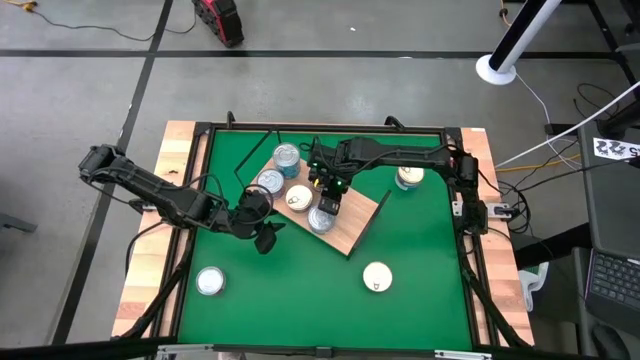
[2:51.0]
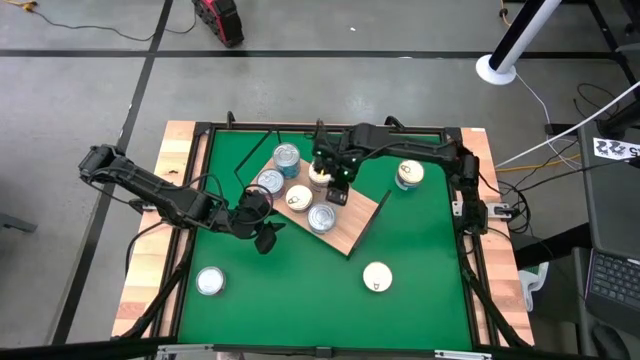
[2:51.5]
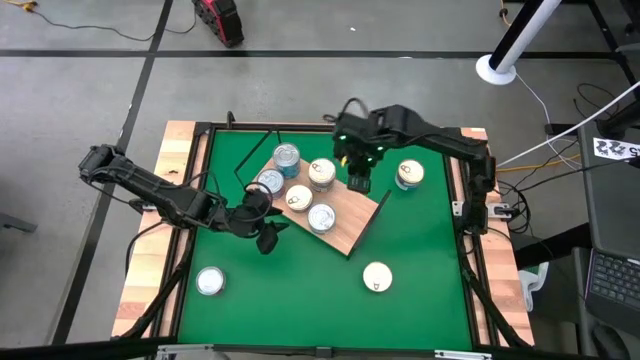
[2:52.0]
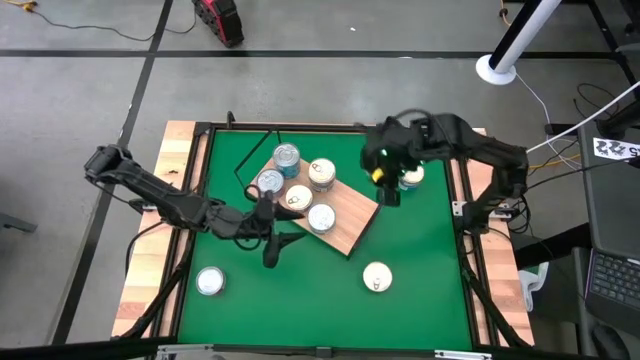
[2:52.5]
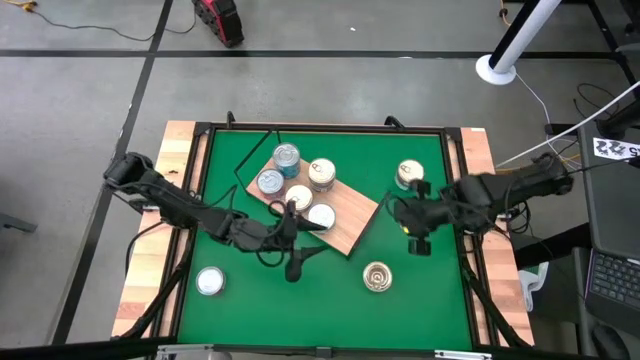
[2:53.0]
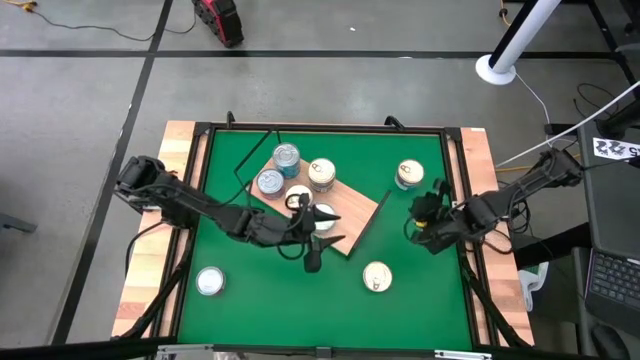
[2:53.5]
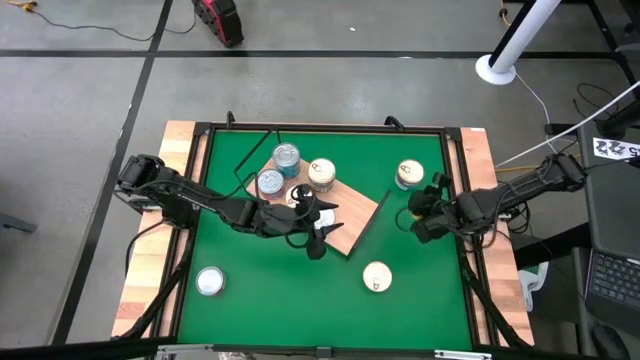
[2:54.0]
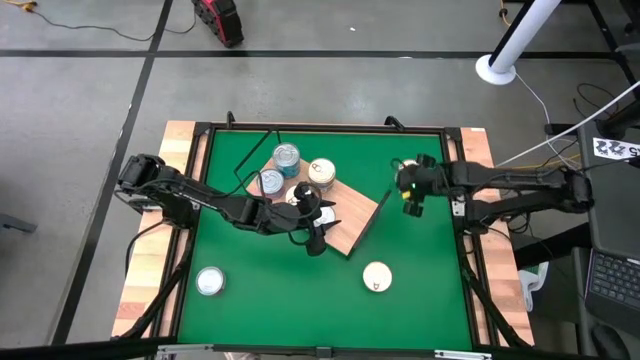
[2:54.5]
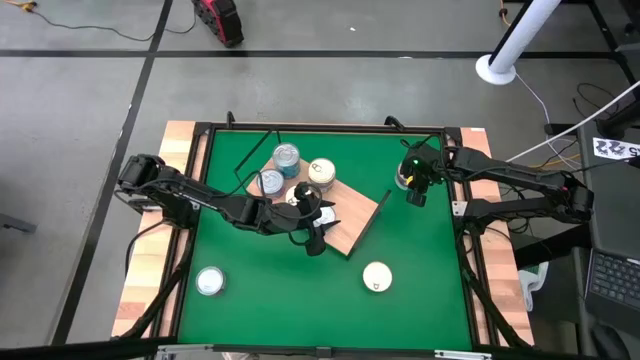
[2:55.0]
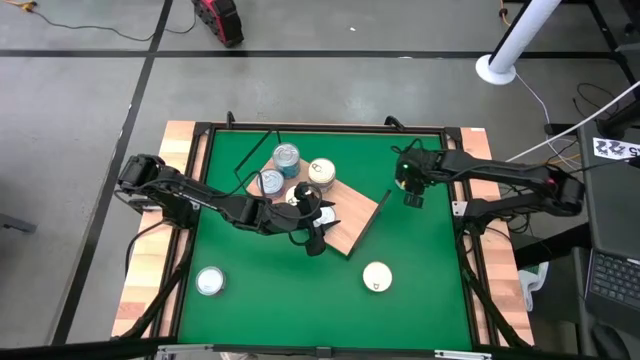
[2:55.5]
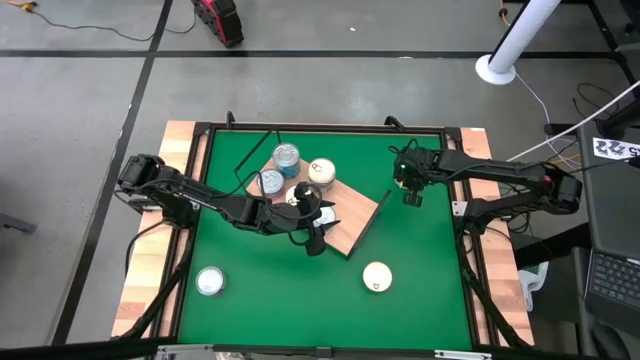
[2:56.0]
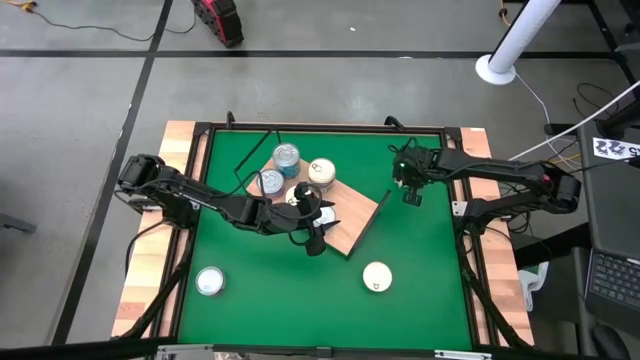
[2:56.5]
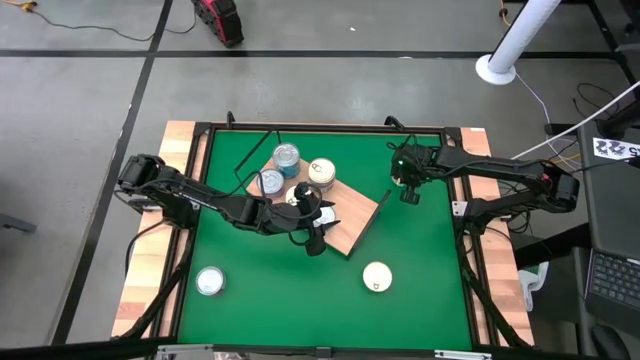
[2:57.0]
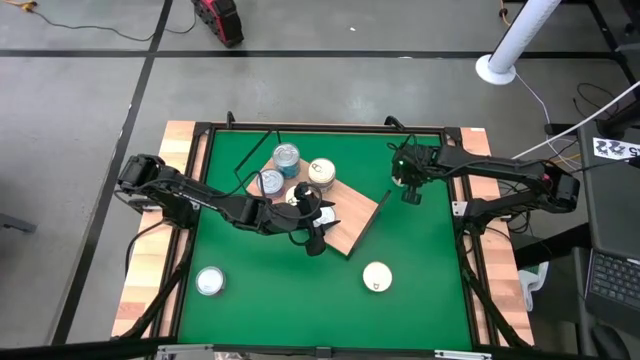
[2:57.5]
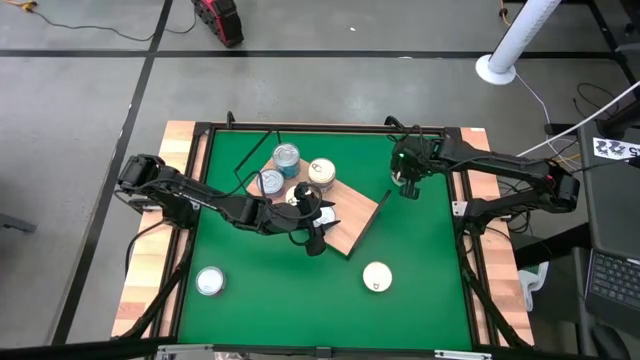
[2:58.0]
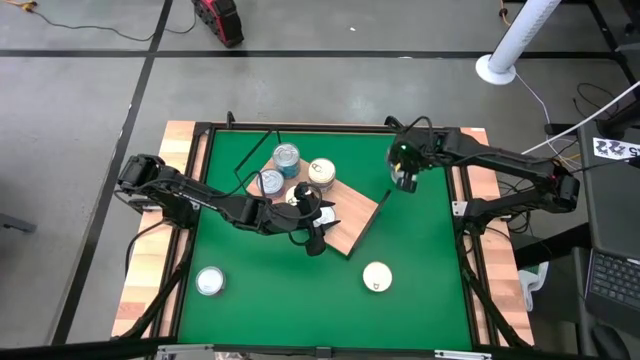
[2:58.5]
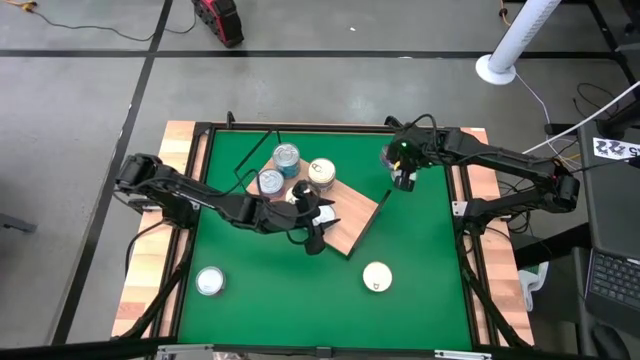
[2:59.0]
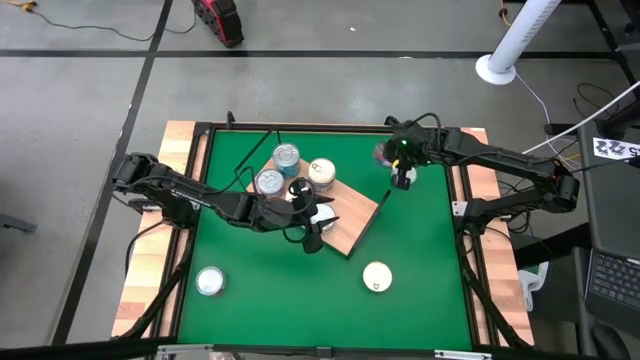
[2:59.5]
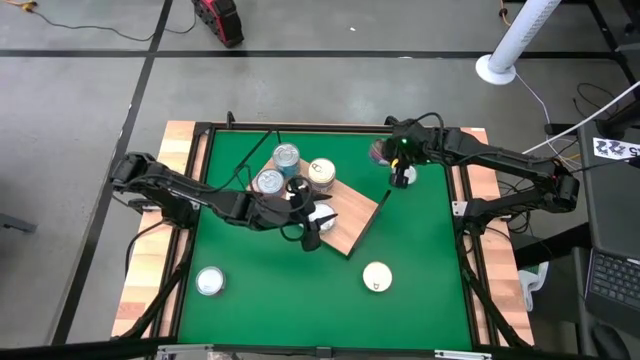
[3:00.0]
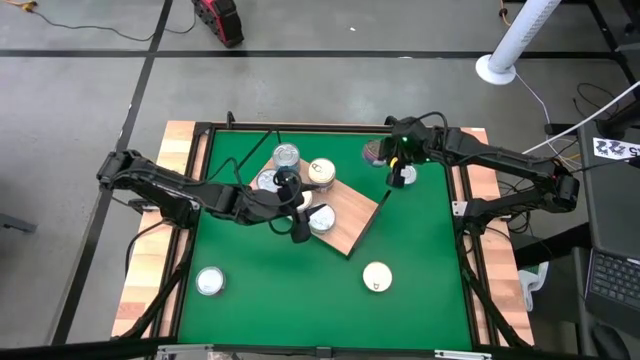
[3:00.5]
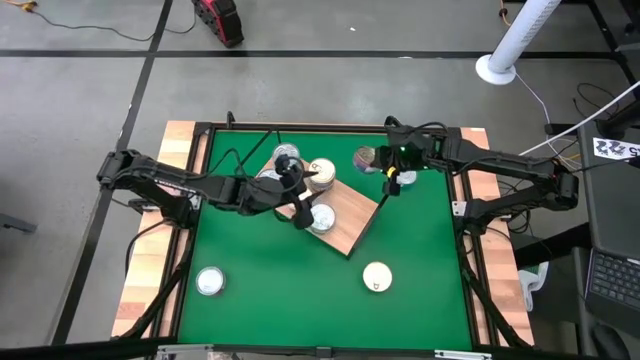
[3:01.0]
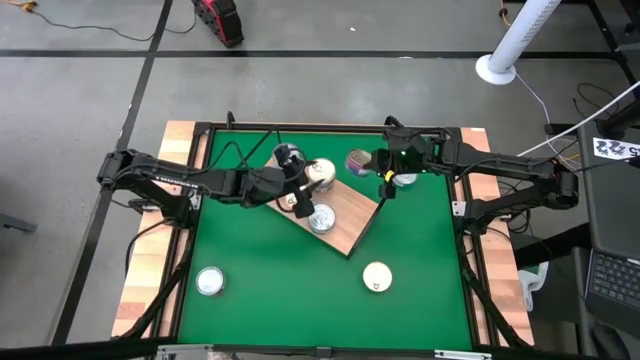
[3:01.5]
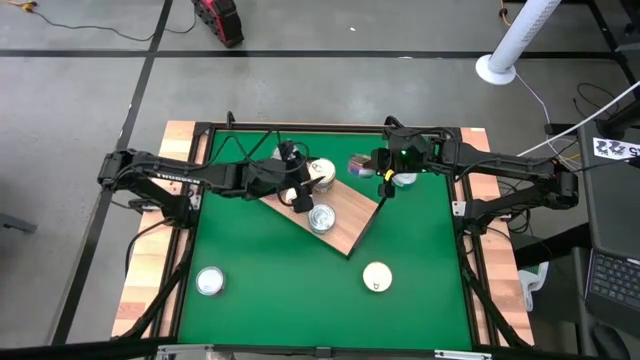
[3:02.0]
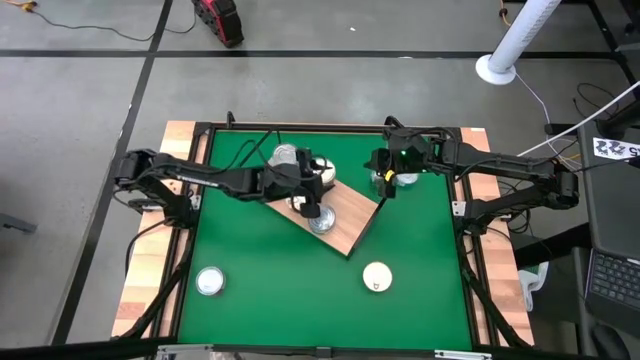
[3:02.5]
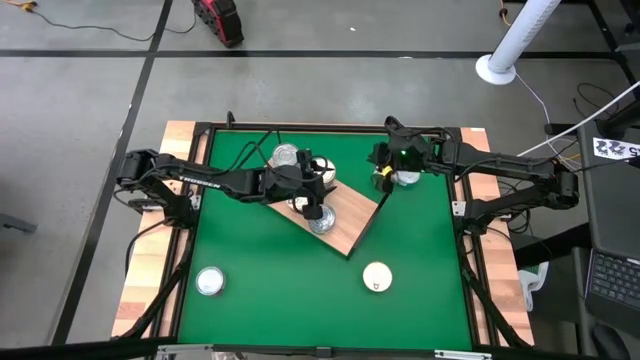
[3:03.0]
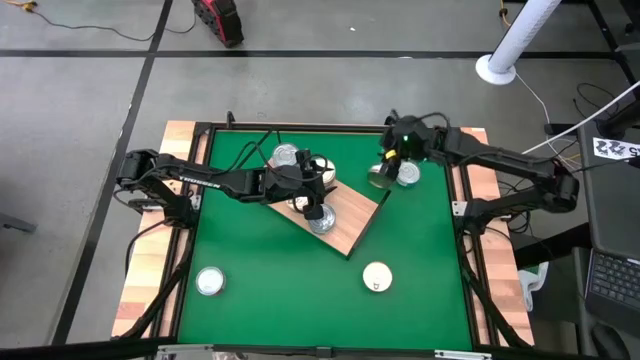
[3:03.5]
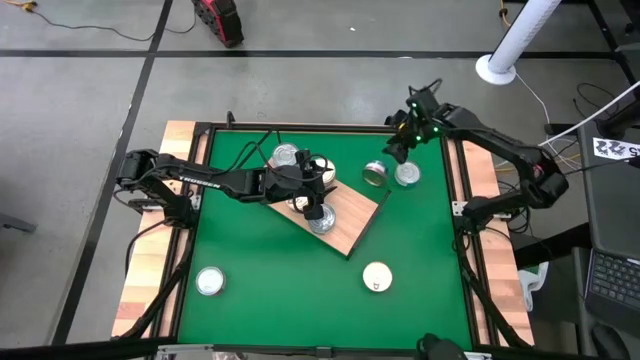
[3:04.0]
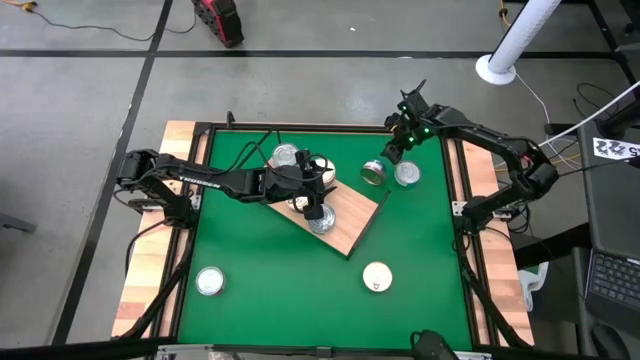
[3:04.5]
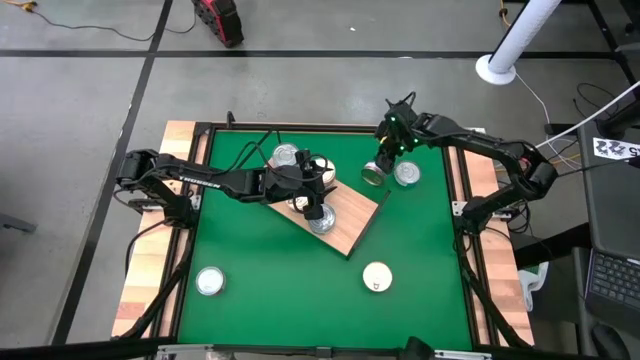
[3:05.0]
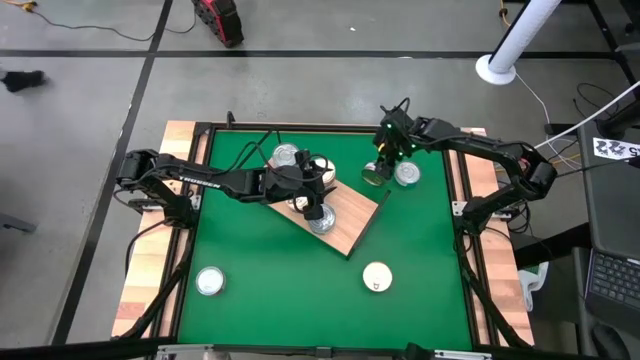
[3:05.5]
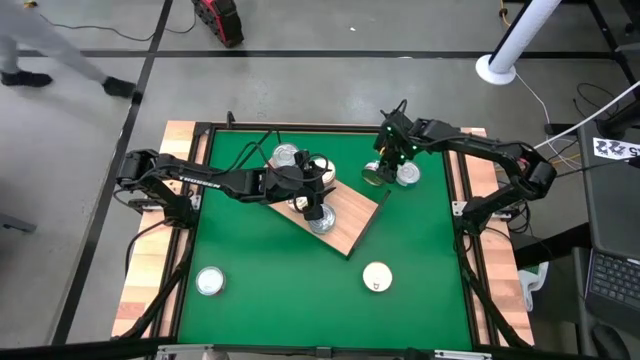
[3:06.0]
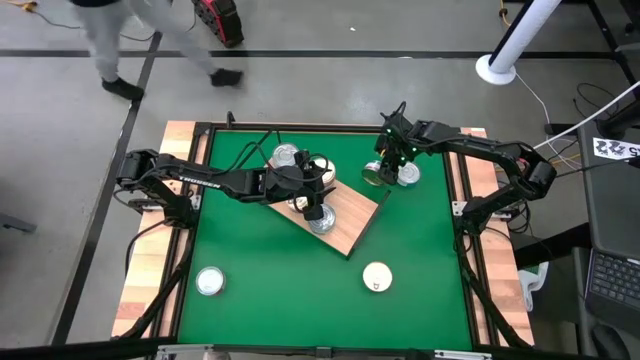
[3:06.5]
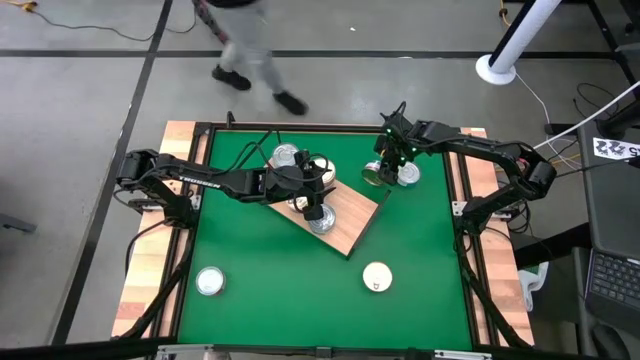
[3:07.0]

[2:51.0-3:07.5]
Task: Stack canned seafood by type on shelf
Stack the blue and pink tuna can on top of the blue and pink tuna can on the shelf

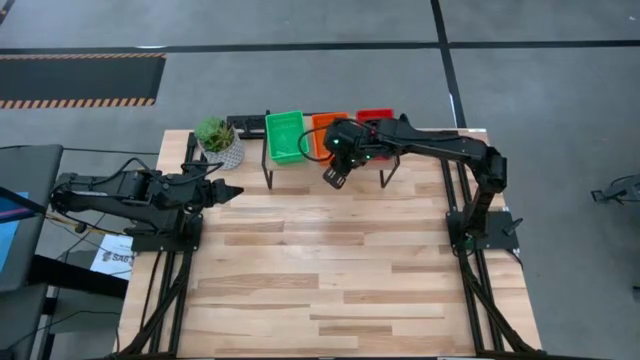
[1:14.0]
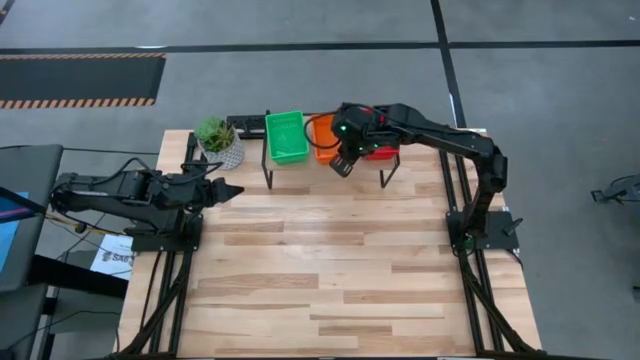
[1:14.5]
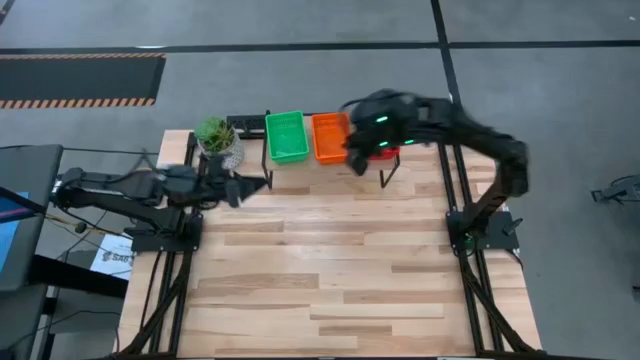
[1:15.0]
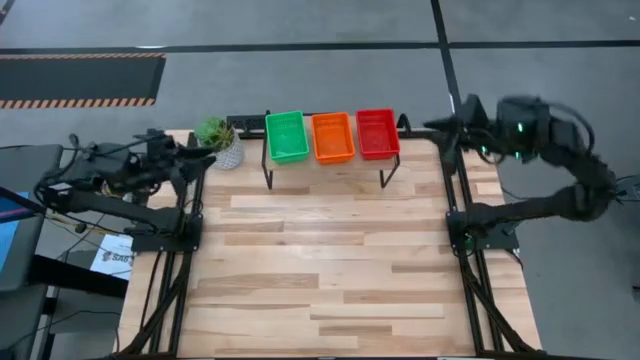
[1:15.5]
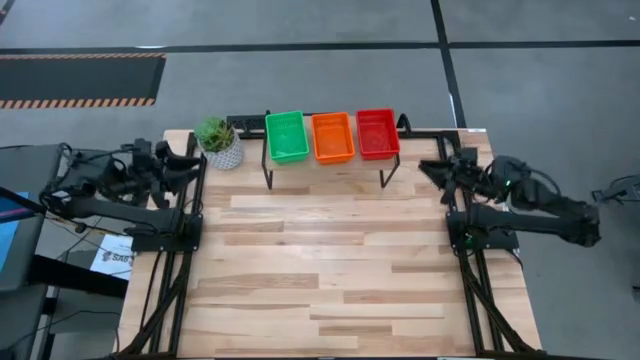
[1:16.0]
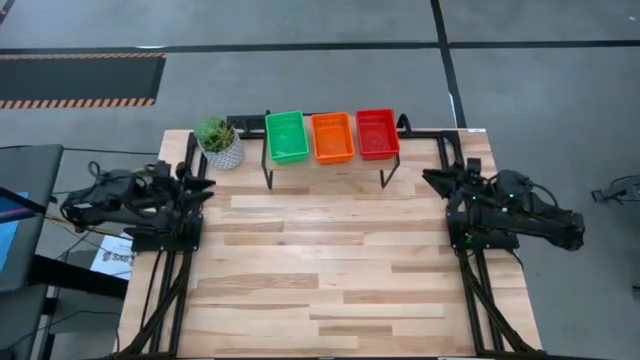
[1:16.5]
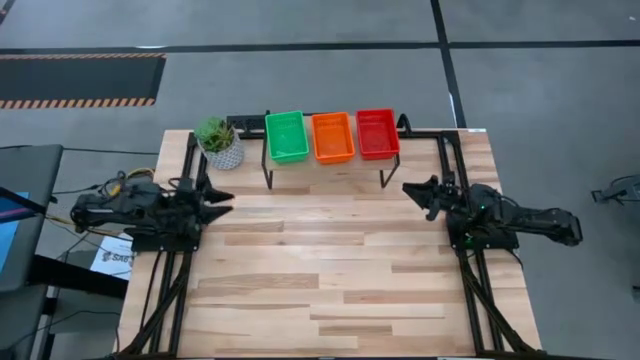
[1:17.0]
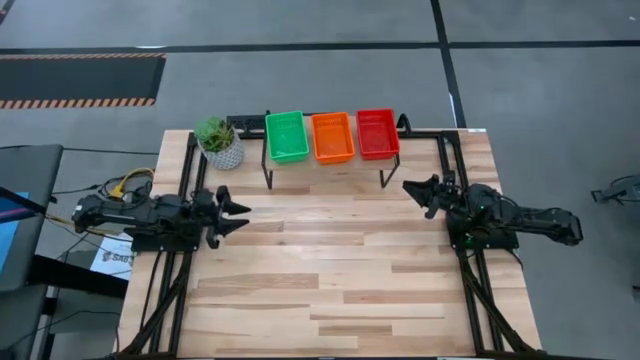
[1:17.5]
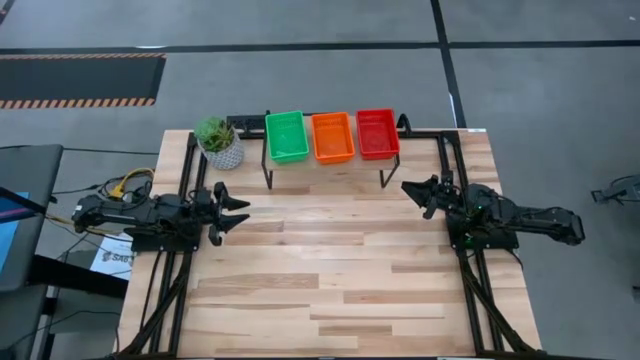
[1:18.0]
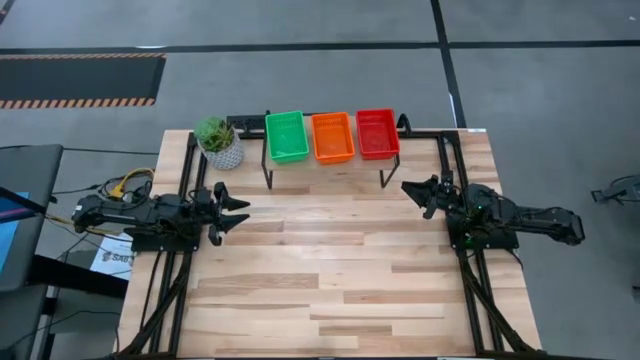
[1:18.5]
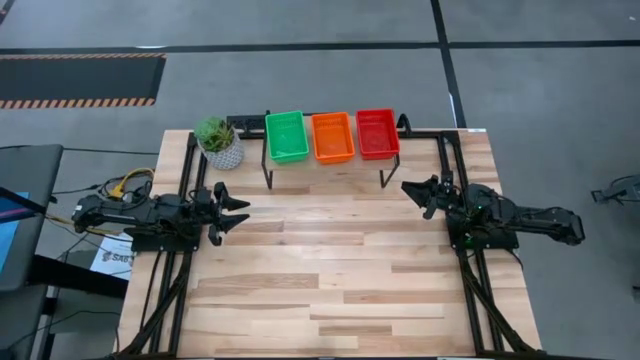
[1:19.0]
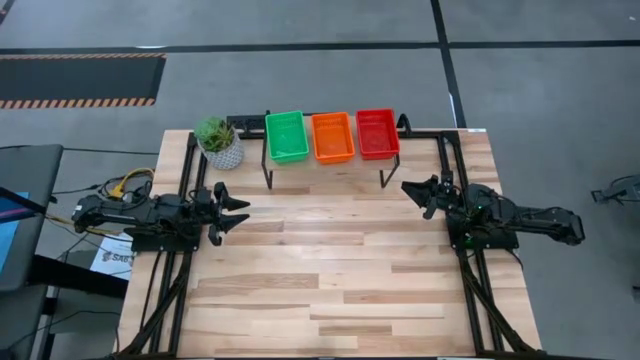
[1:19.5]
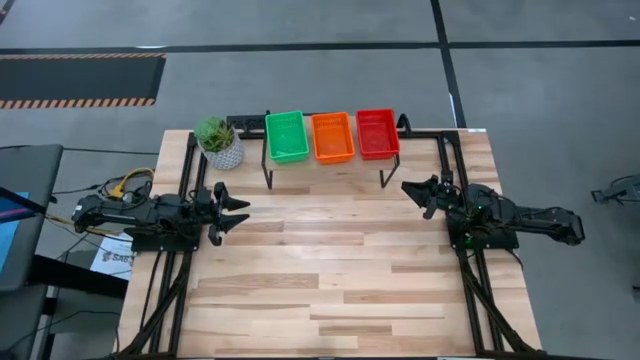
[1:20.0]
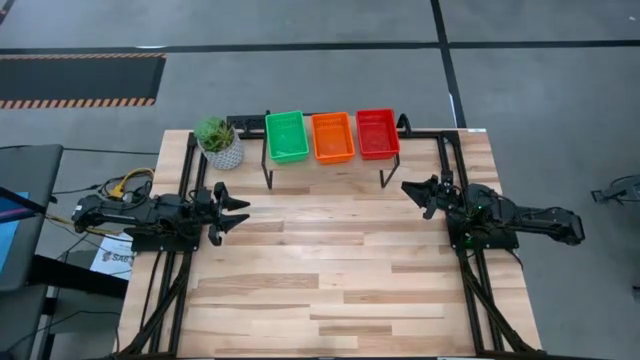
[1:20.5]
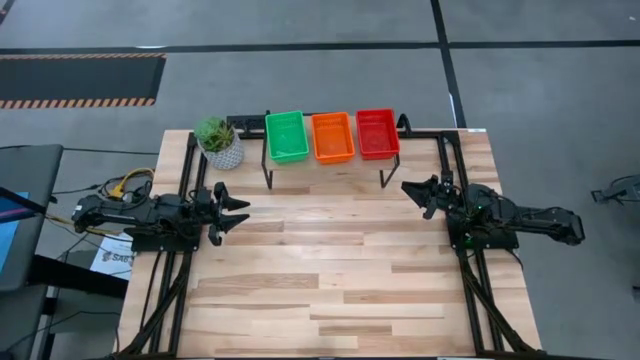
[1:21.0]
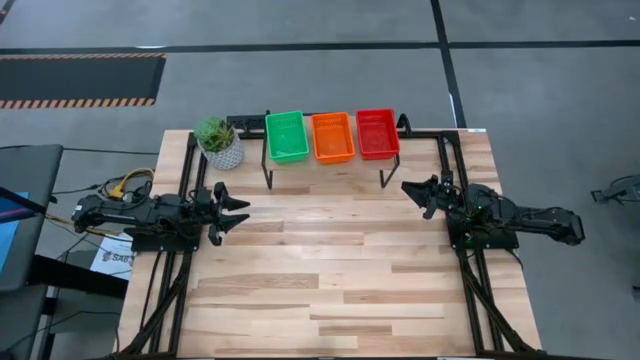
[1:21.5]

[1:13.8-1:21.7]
Task: Stack baskets on shelf by color
Return to Home Position
